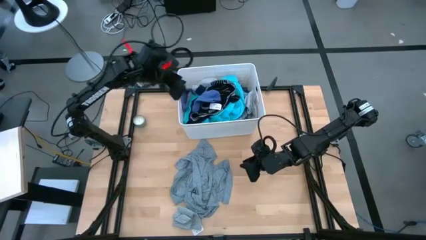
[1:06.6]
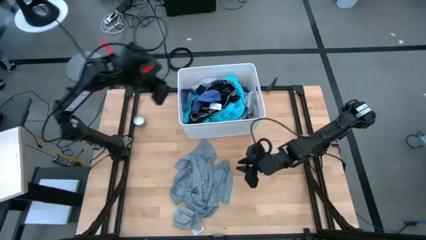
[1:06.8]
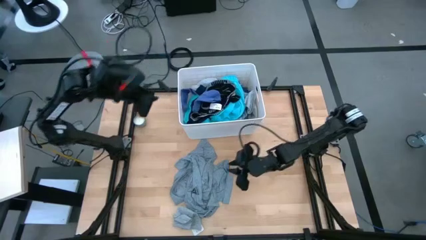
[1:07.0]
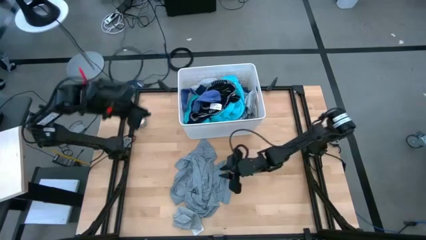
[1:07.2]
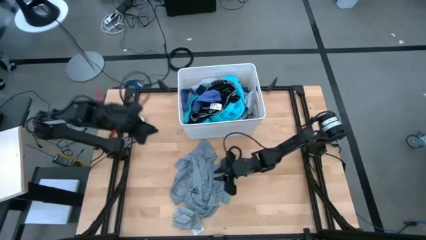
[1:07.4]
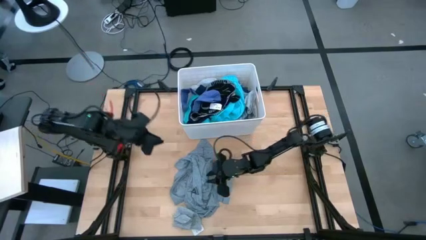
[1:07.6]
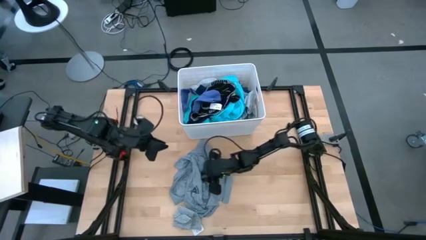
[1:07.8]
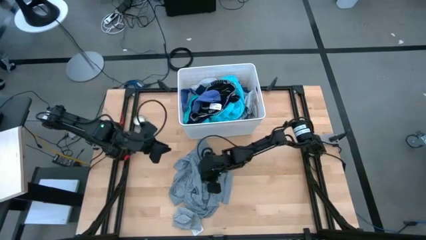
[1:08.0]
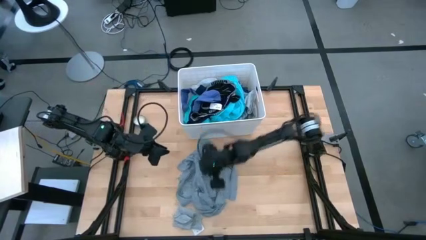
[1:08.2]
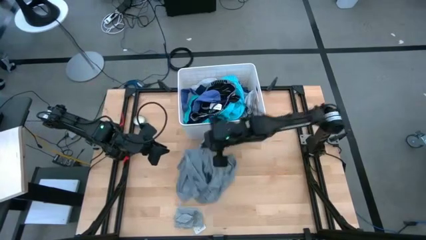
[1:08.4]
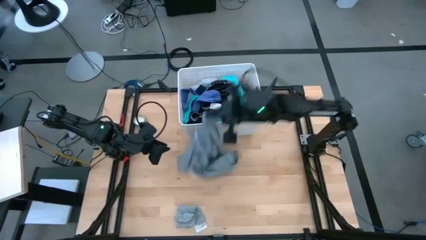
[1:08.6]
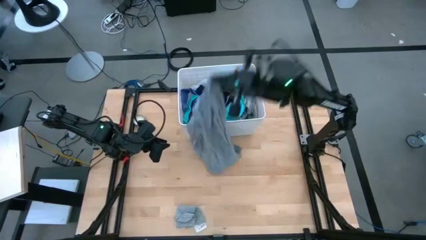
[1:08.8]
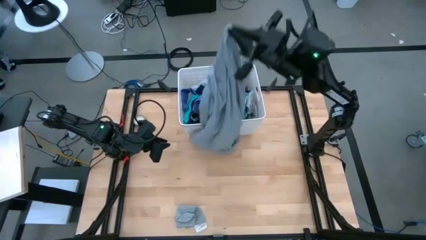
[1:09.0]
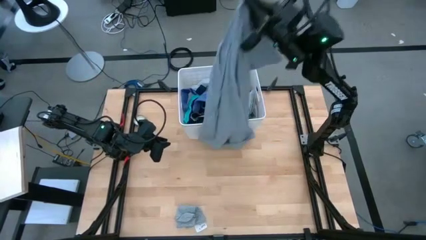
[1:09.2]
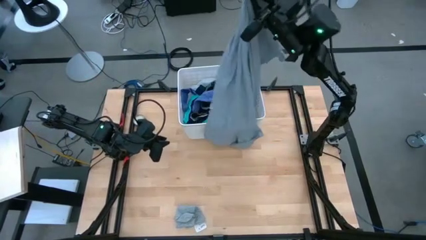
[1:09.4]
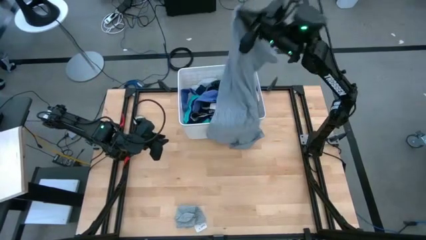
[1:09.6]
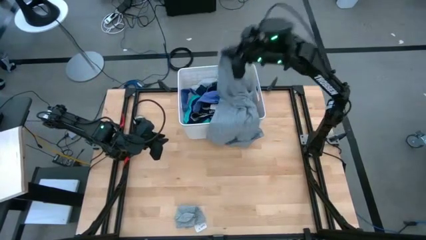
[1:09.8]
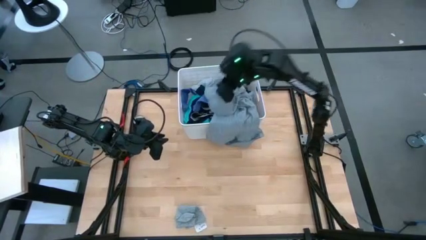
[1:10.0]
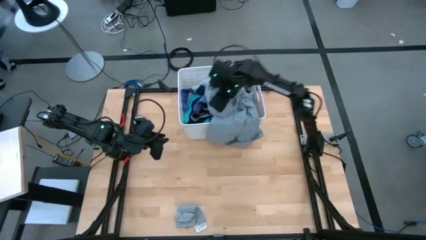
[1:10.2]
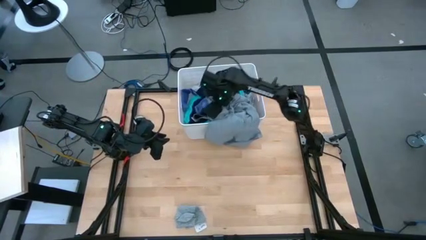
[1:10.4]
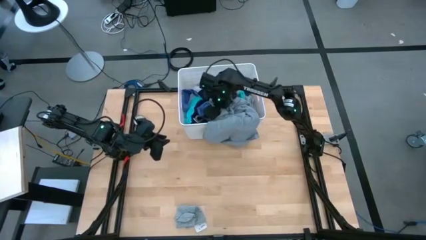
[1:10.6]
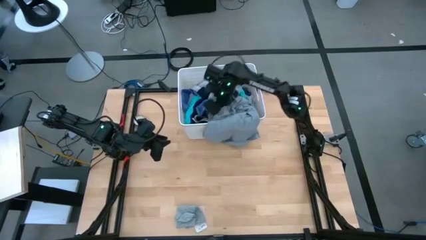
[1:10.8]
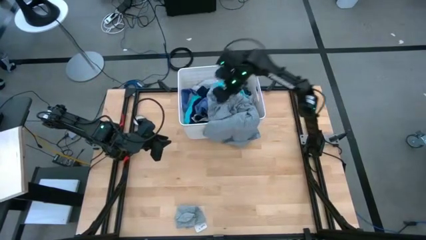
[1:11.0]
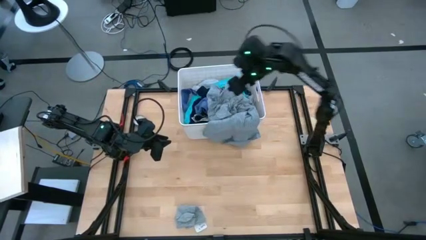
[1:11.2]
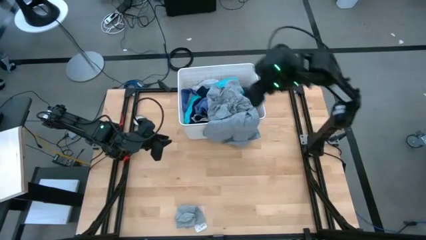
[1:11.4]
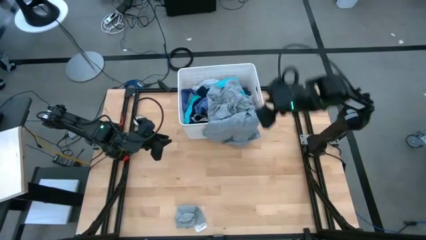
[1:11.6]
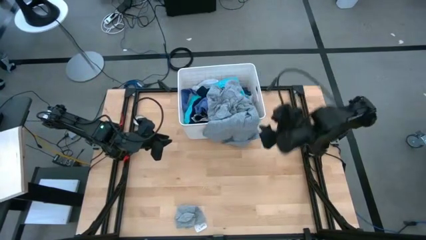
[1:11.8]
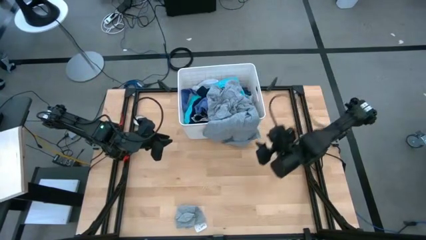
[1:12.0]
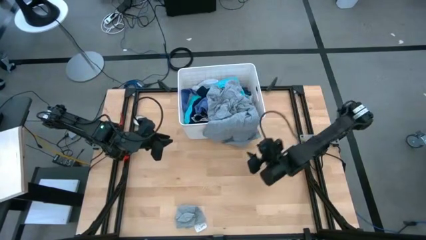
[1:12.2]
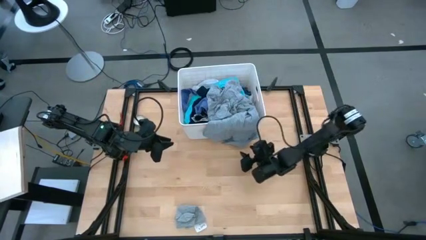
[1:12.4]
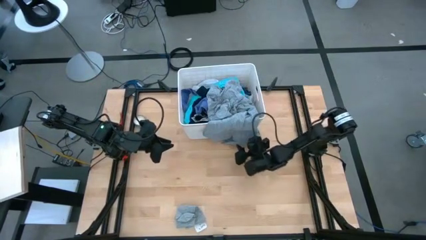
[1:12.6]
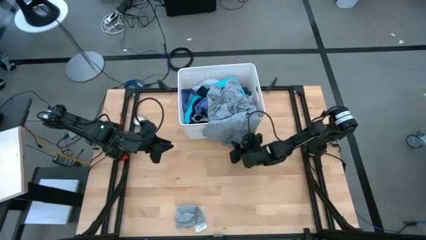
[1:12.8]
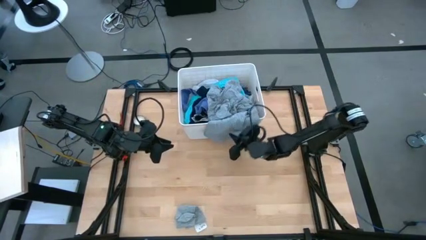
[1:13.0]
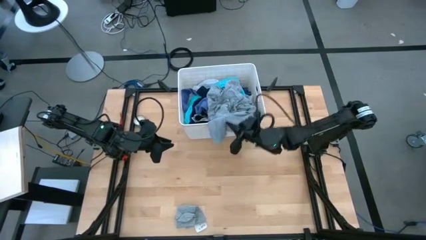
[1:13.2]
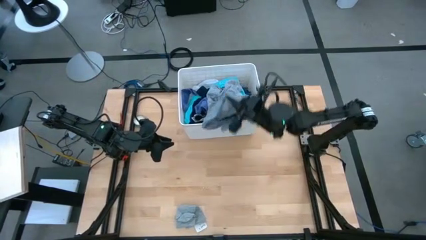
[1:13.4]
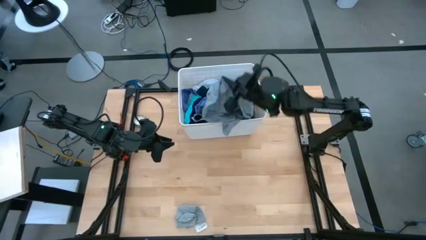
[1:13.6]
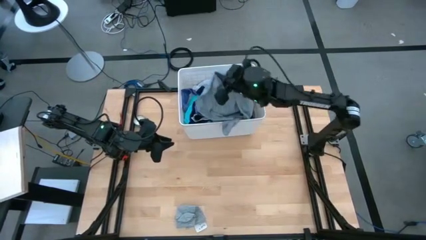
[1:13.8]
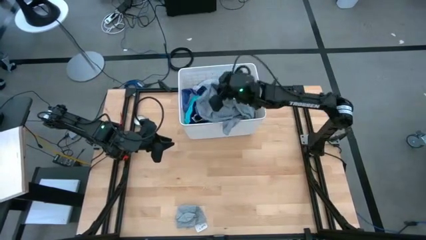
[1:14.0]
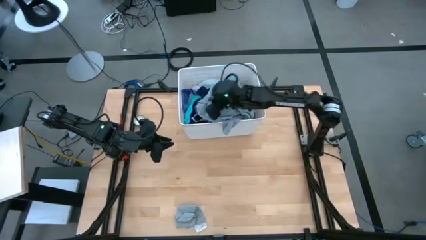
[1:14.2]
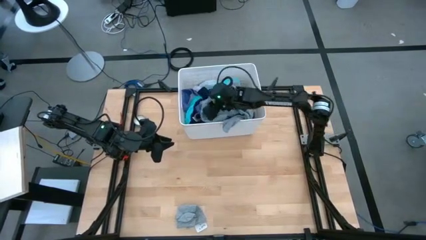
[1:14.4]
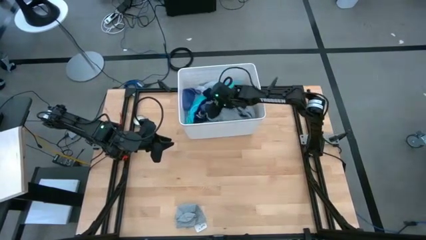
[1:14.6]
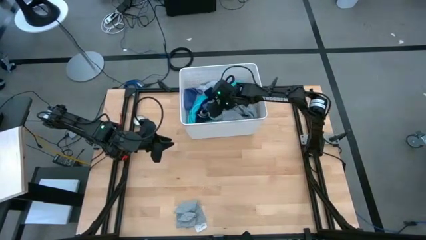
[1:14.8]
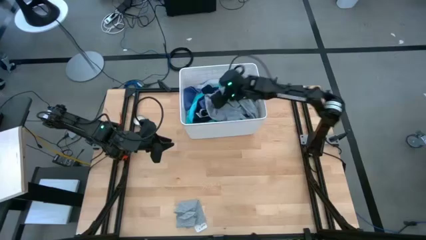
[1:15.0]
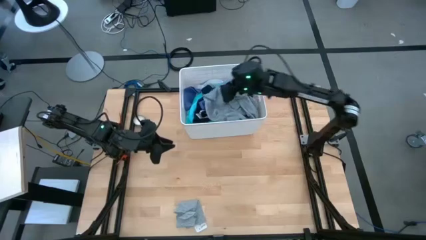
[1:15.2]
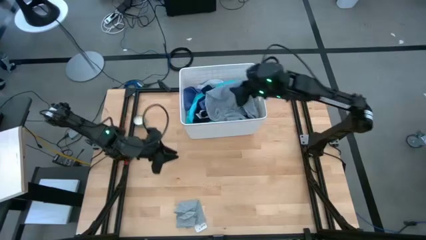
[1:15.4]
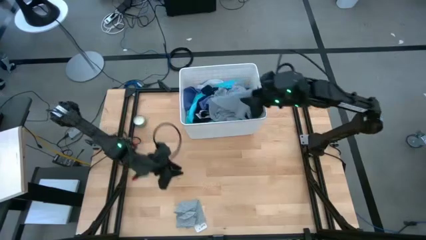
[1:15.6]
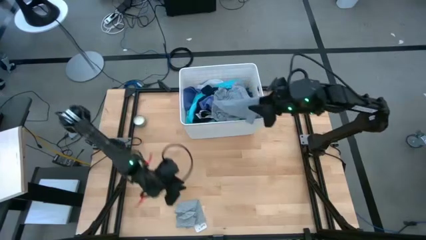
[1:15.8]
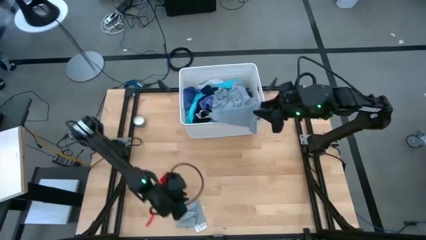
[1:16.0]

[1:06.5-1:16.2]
Task: Sort clothes
Put the gray shirt into the bin

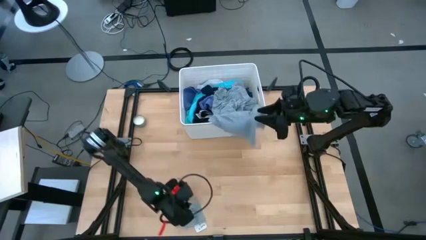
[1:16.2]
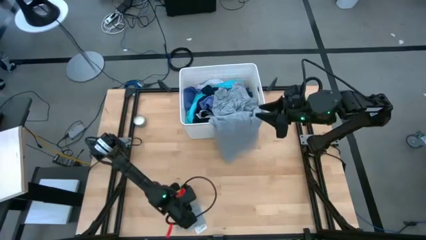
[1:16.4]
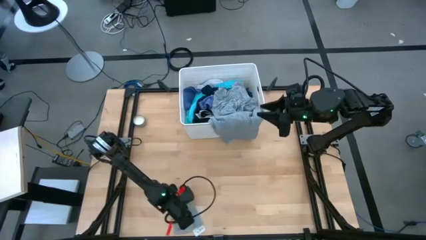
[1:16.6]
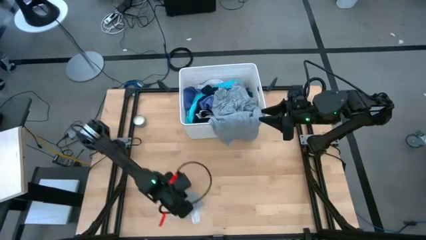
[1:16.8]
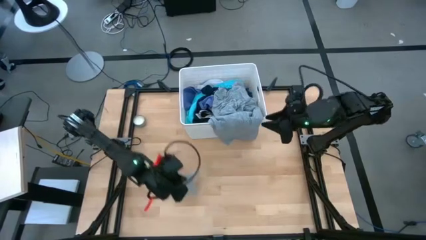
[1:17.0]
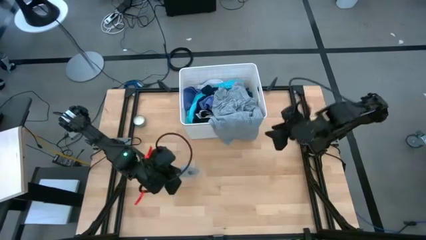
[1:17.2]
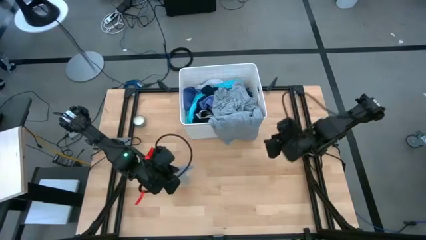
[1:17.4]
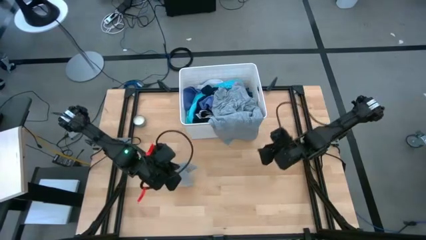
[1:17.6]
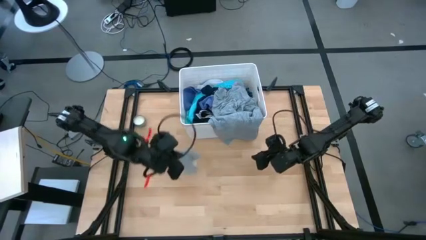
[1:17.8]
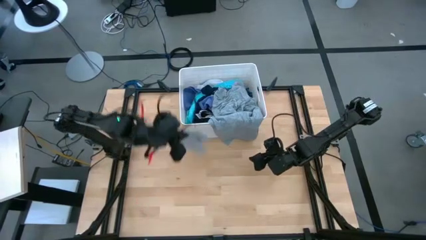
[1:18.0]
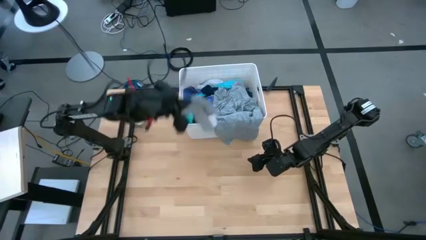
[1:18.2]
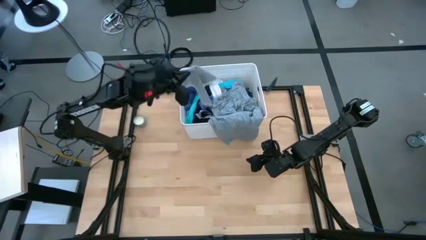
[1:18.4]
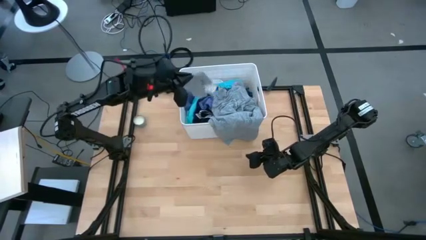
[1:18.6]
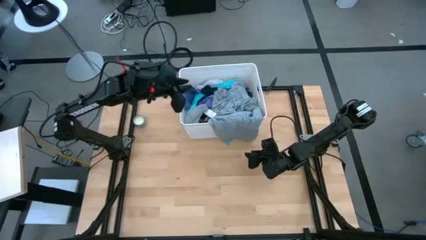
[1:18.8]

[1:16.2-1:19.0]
Put the gray sock into the bin

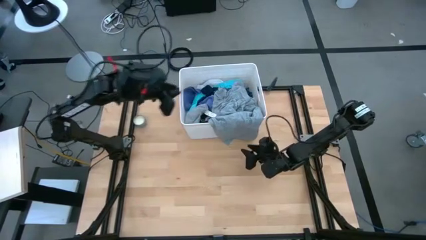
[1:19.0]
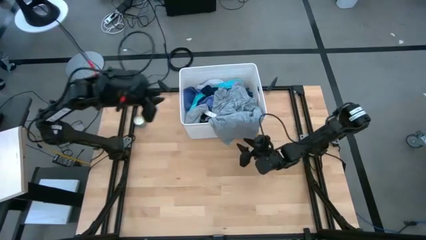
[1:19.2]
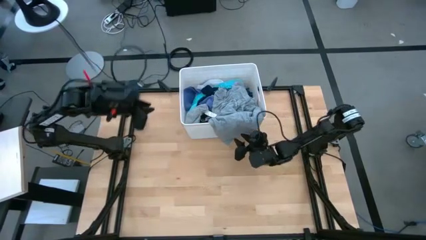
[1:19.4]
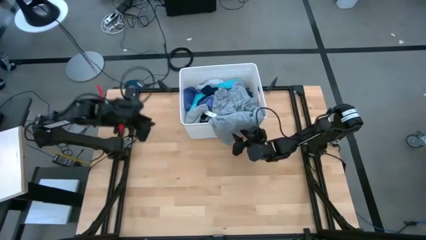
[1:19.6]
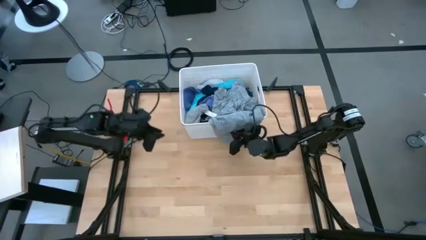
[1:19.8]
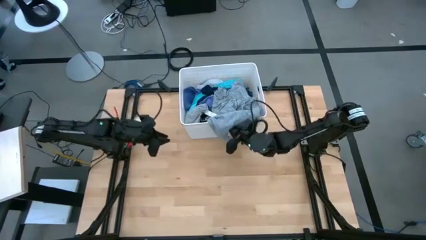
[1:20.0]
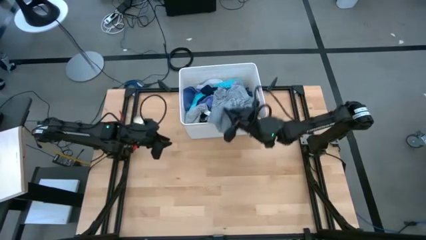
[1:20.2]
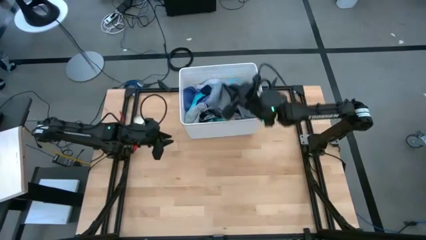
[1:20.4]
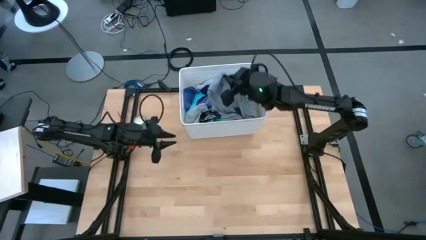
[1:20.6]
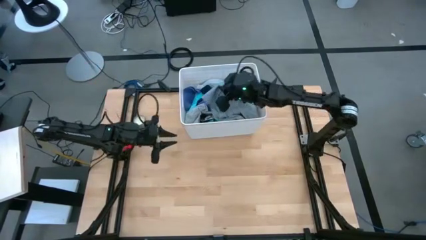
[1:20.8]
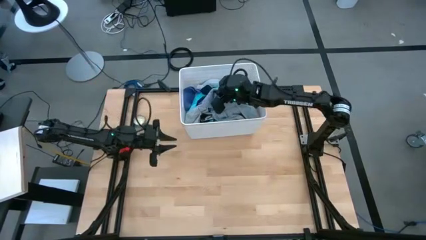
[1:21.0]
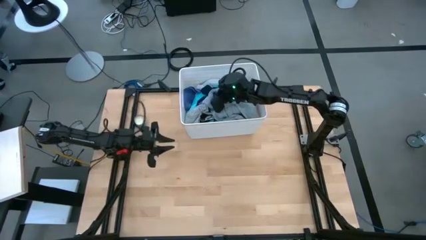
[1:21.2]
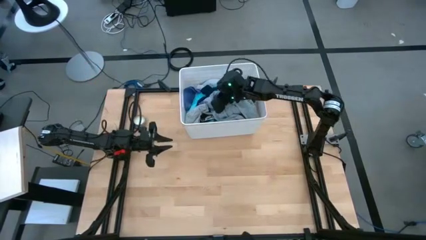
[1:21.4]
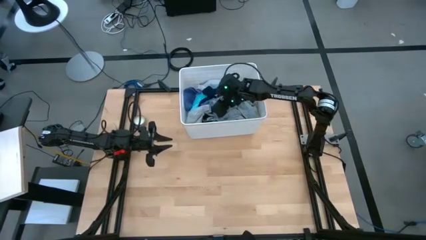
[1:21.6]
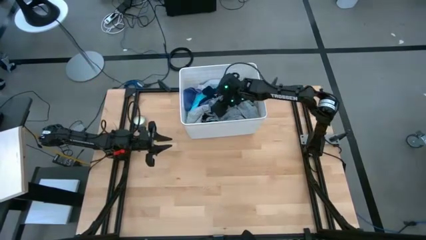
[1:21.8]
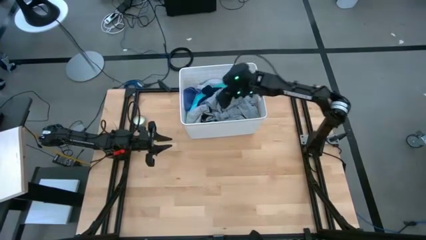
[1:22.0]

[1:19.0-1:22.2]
Put the gray shirt into the bin
